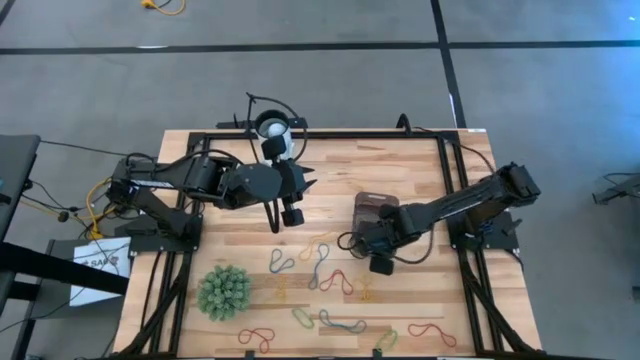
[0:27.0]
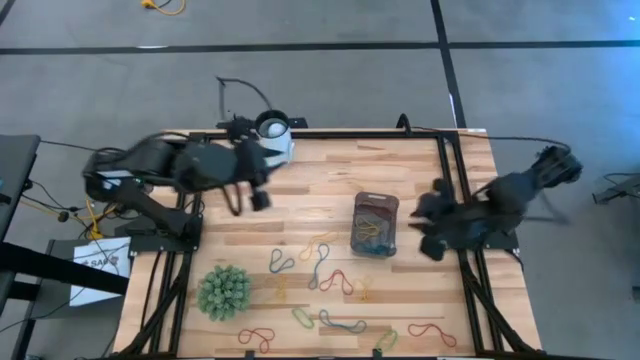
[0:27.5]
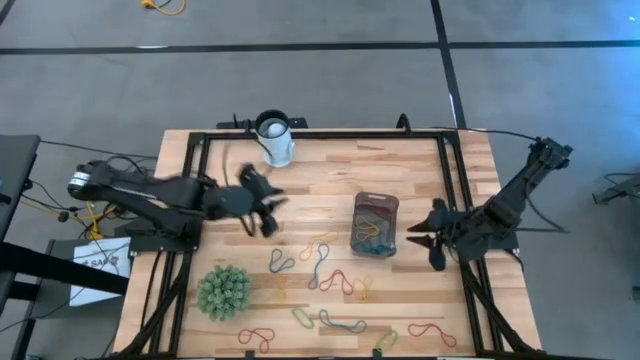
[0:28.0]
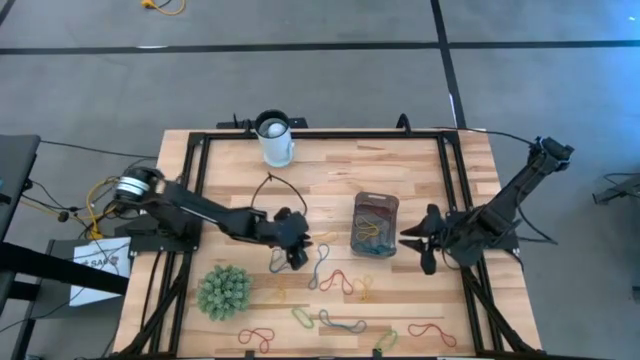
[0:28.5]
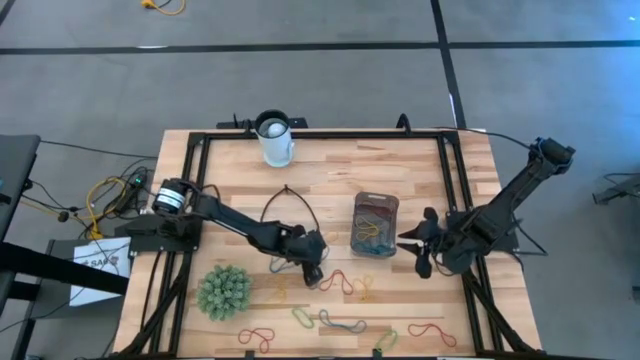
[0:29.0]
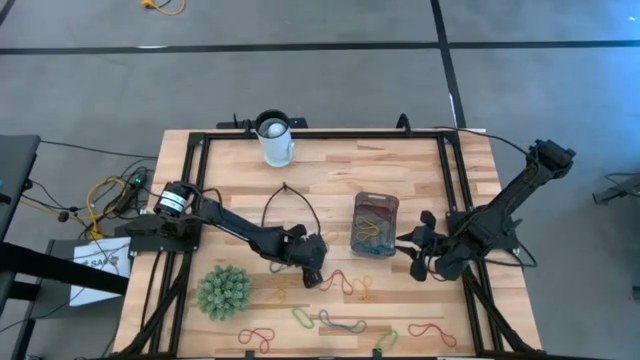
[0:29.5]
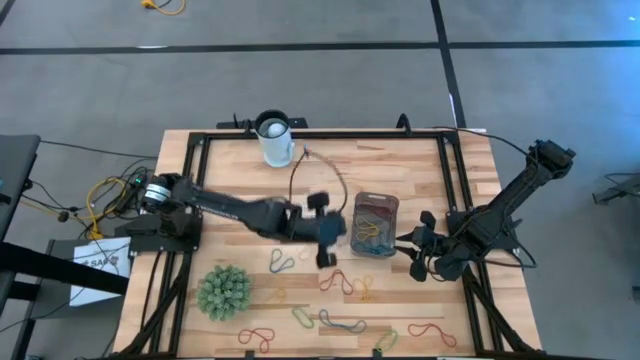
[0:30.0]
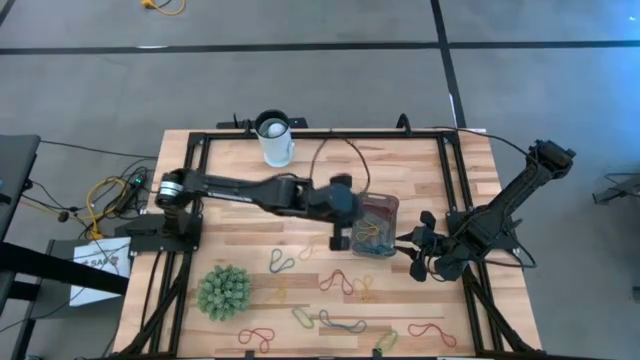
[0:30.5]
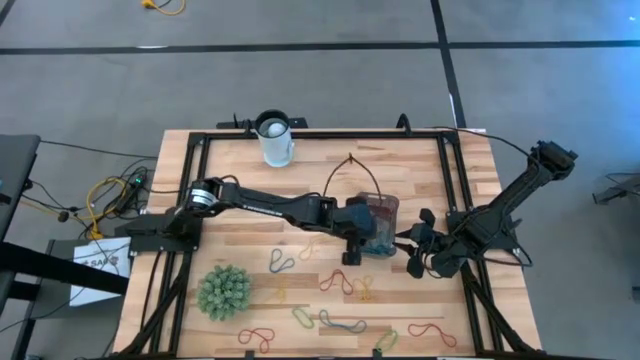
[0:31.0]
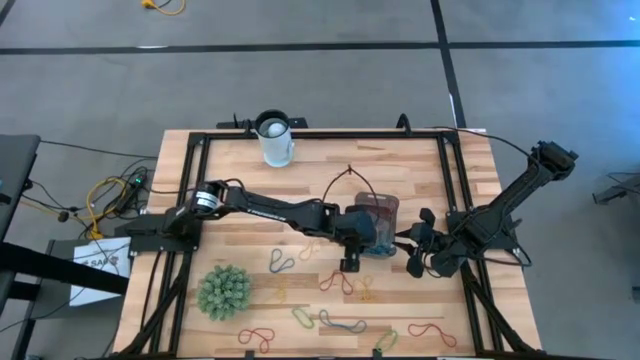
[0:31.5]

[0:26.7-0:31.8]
Task: Pick and place items into bin
Put the blue rubber band into the black bin

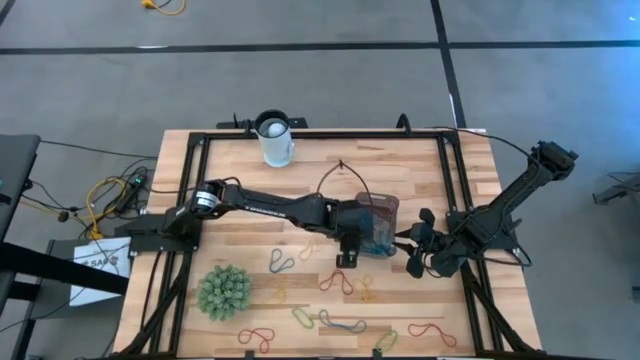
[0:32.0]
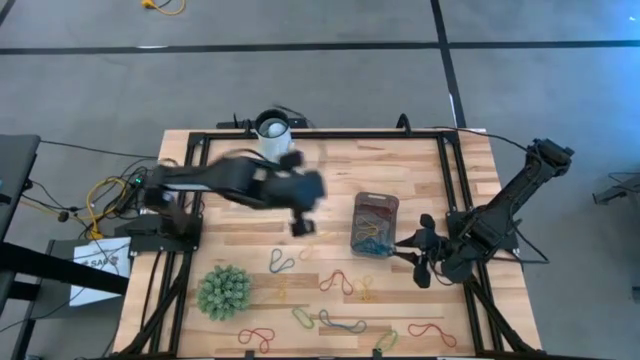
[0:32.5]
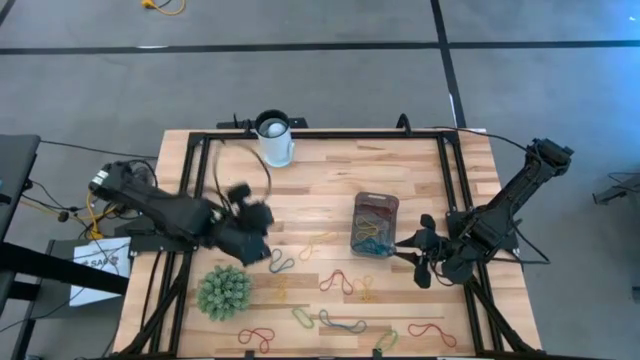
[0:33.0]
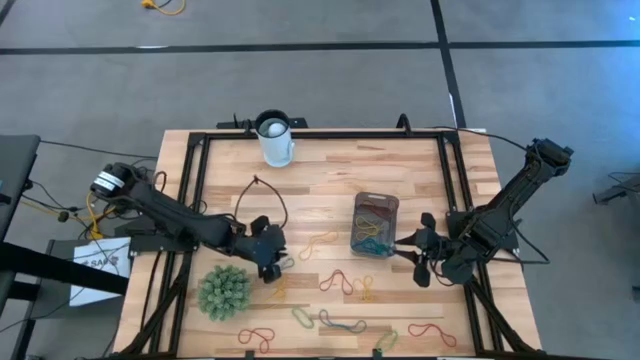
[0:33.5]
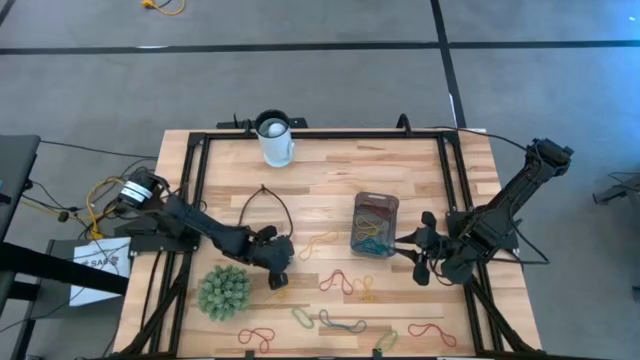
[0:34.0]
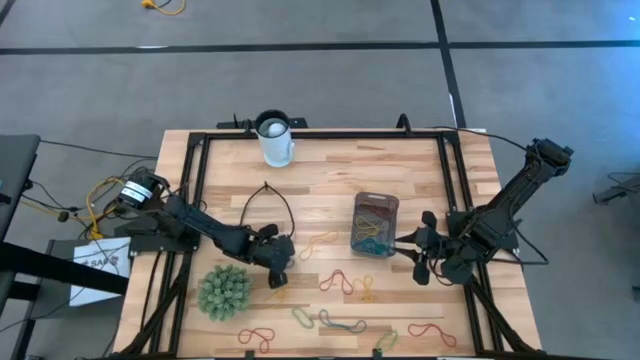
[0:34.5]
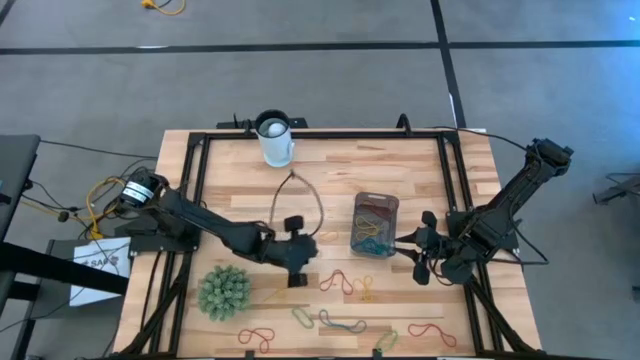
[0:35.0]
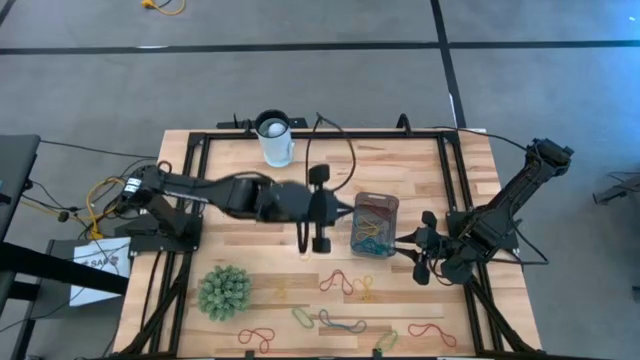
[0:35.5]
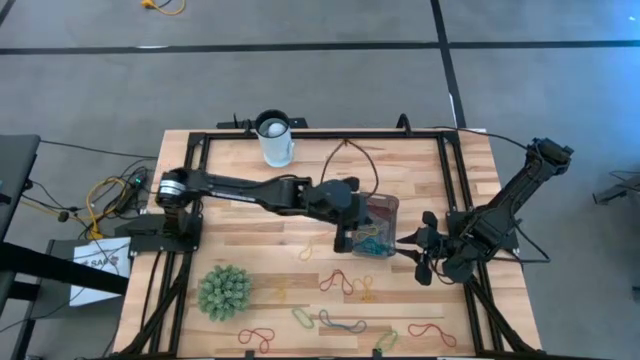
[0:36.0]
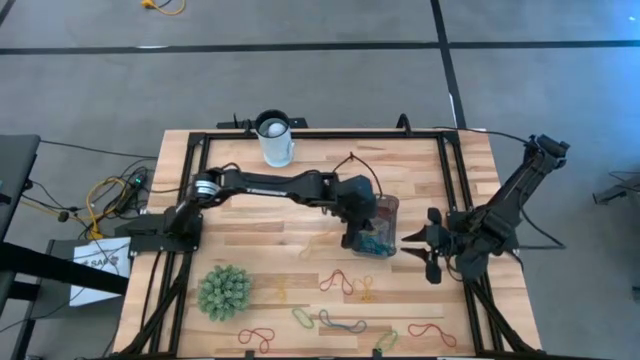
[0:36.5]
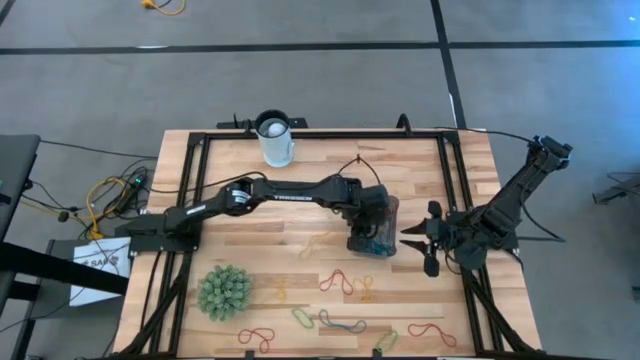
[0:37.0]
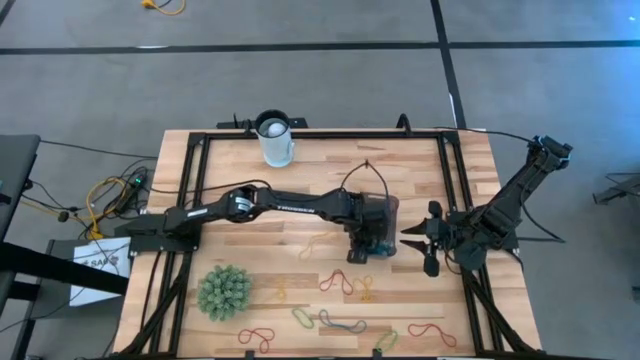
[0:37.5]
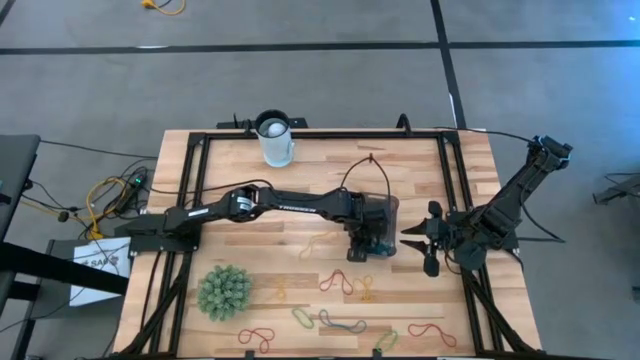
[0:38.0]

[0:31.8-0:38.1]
Put the blue rubber band into the black bin

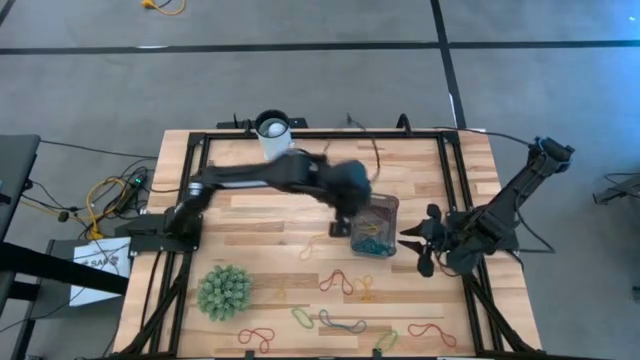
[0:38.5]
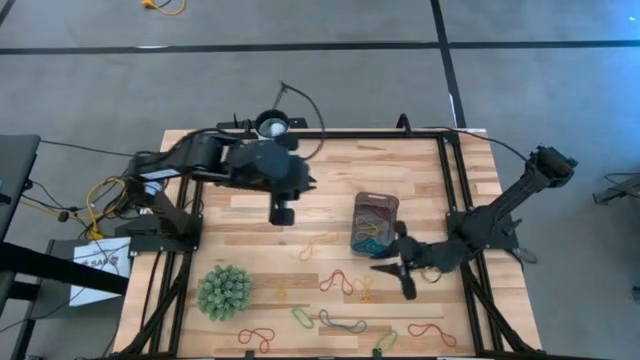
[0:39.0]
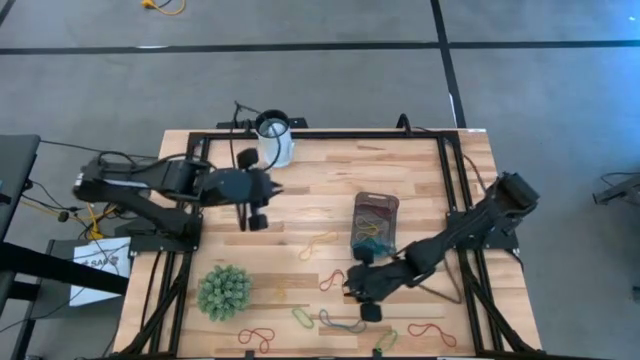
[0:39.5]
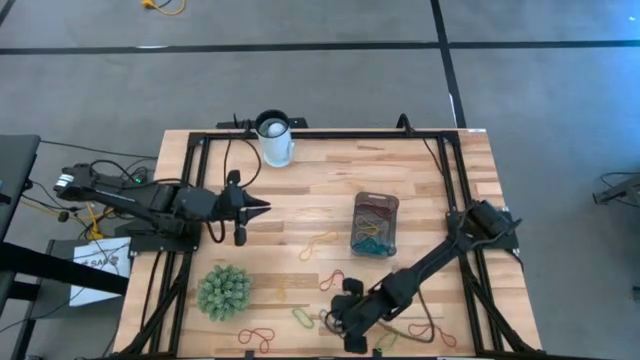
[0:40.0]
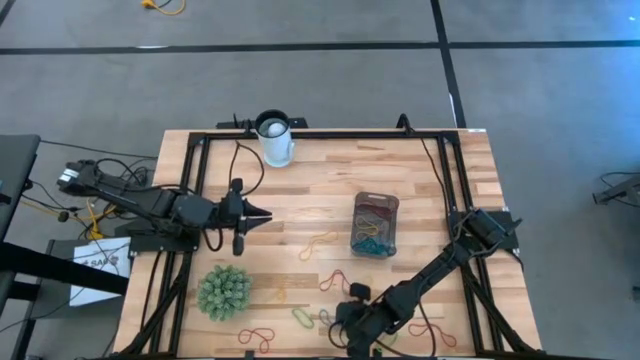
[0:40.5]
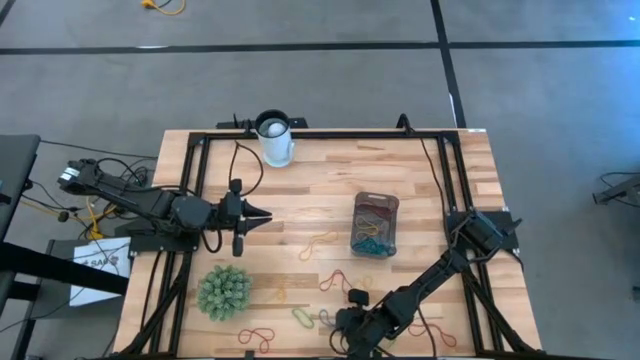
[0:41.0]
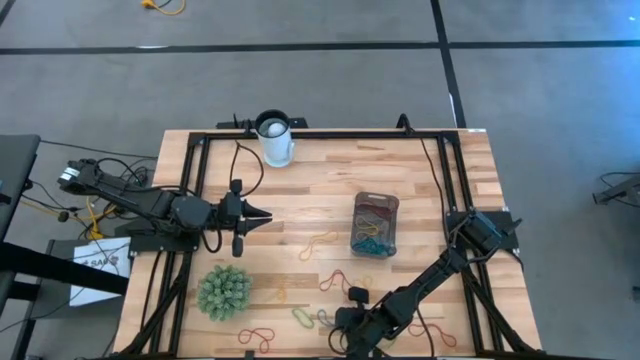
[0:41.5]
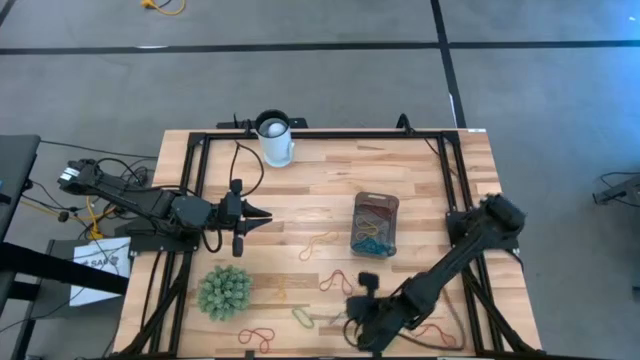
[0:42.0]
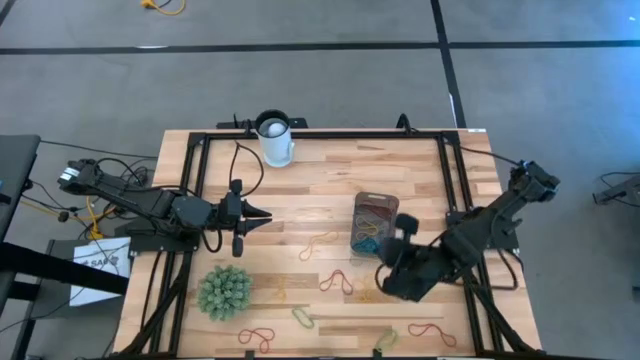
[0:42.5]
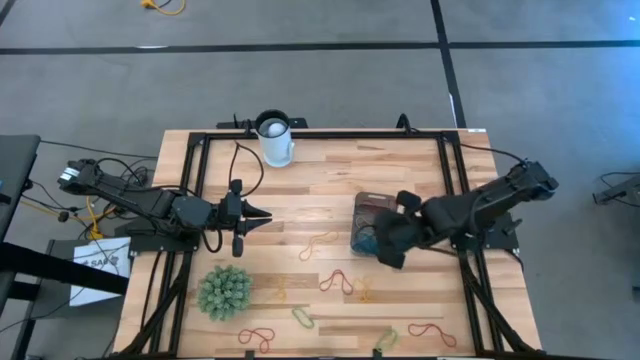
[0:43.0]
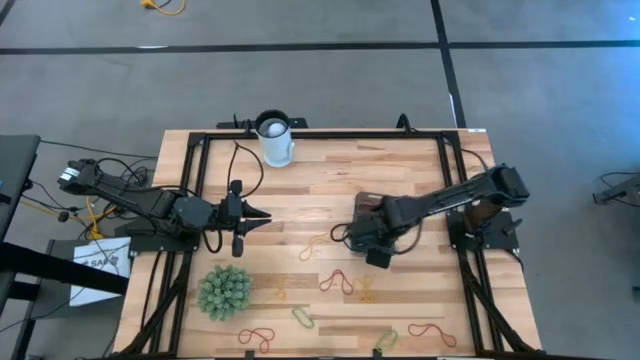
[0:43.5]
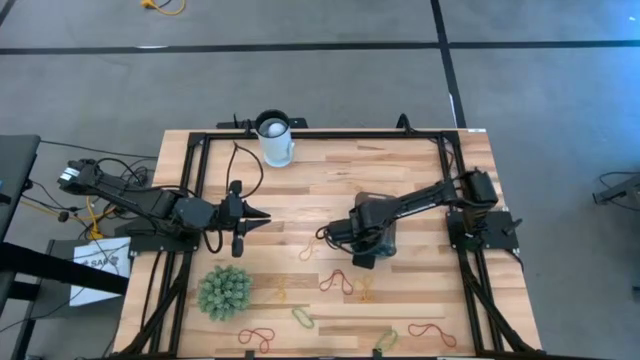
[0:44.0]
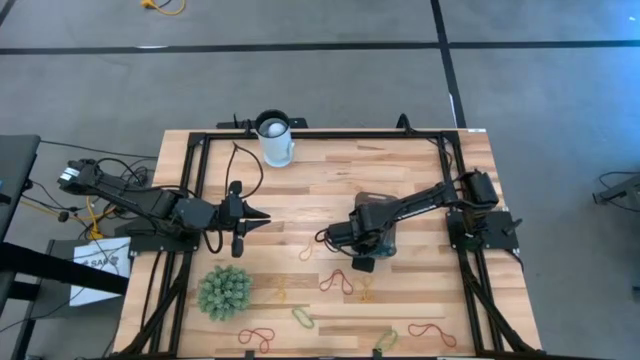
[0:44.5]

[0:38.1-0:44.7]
Put the blue rubber band into the black bin

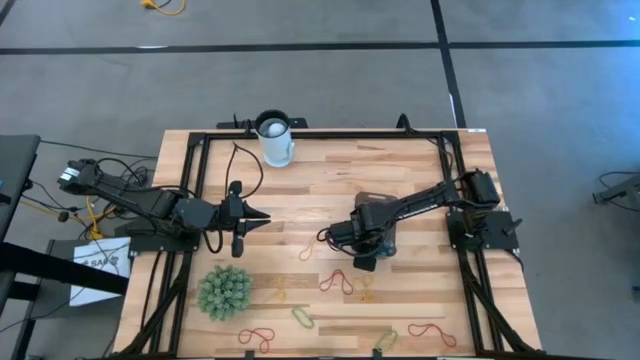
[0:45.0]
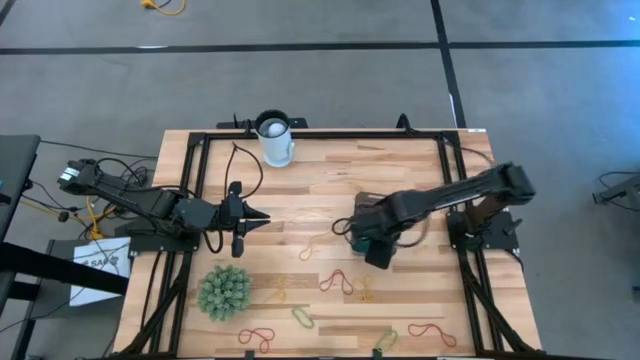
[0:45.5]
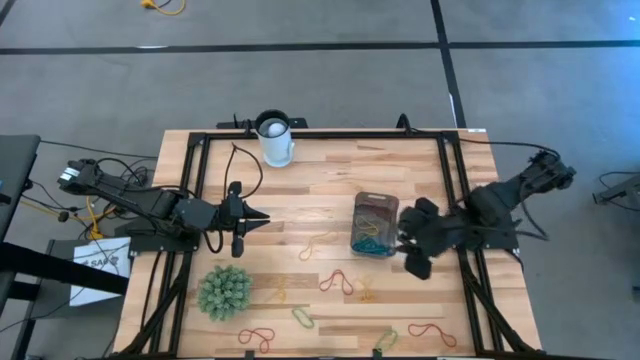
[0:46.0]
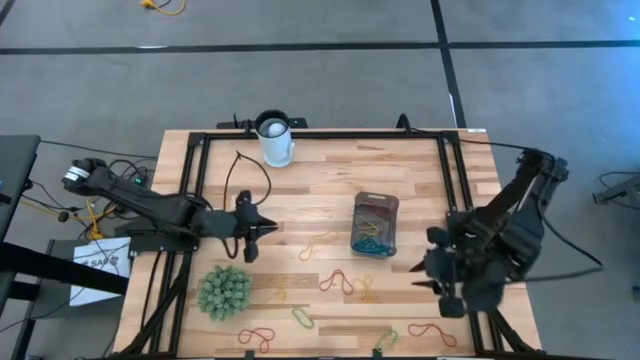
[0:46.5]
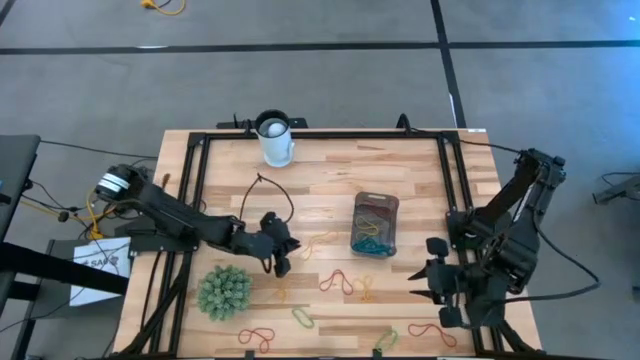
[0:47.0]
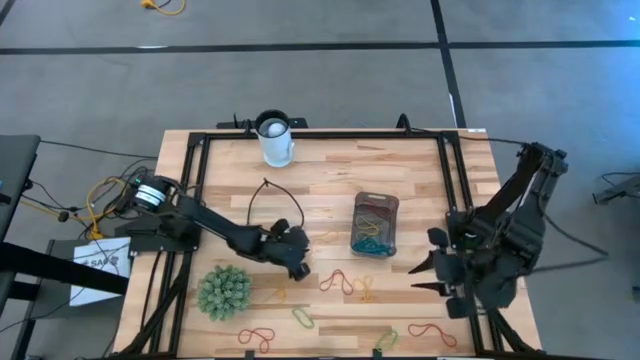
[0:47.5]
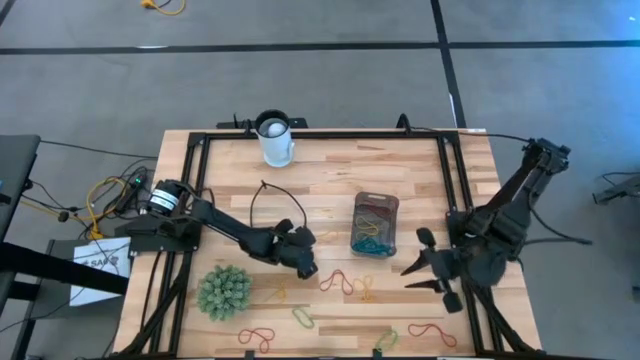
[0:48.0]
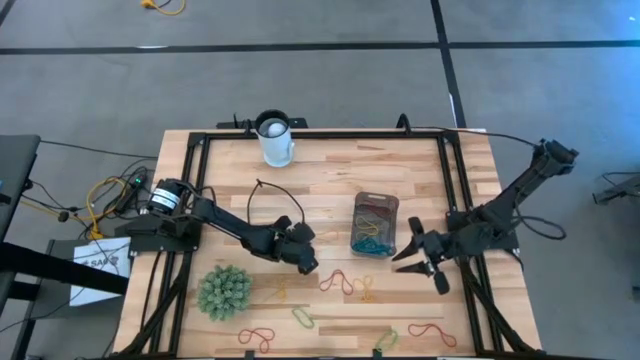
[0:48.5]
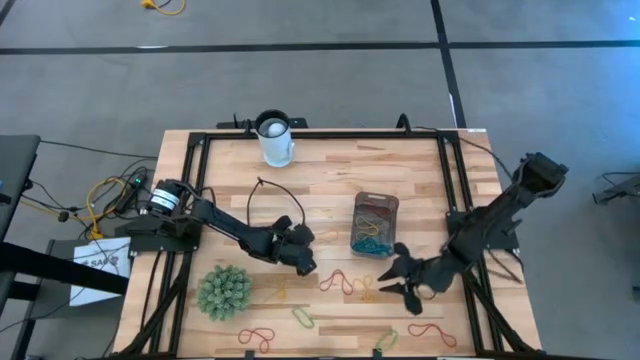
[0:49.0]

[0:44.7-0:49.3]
Put the yellow rubber band into the black bin
